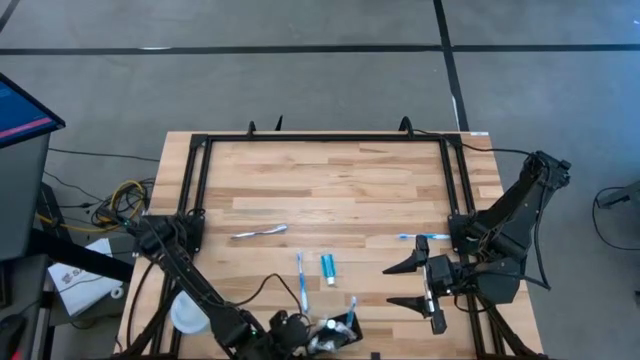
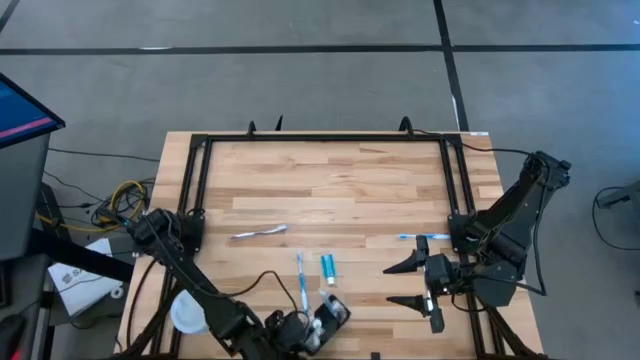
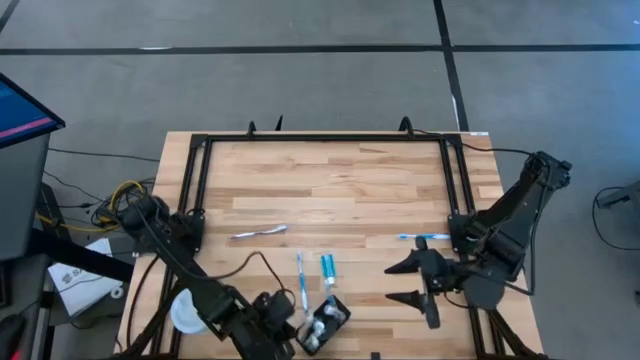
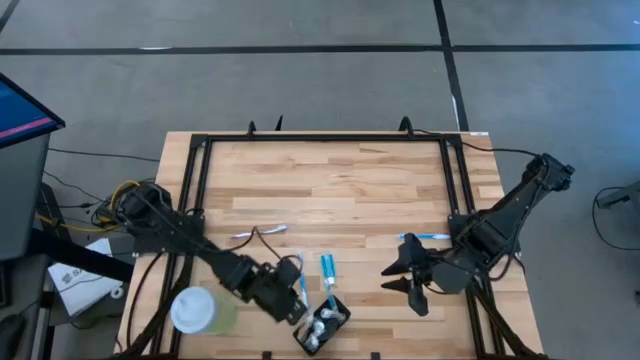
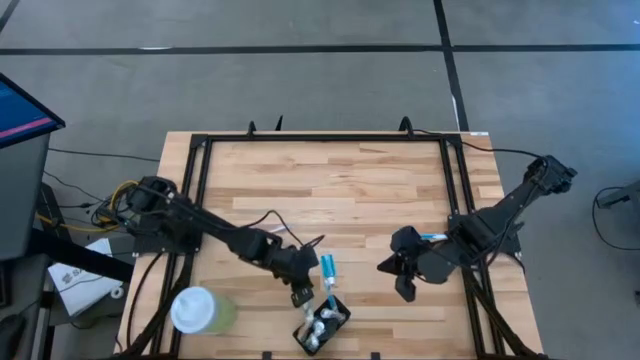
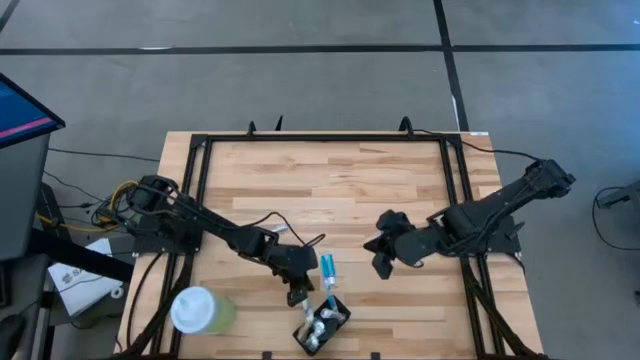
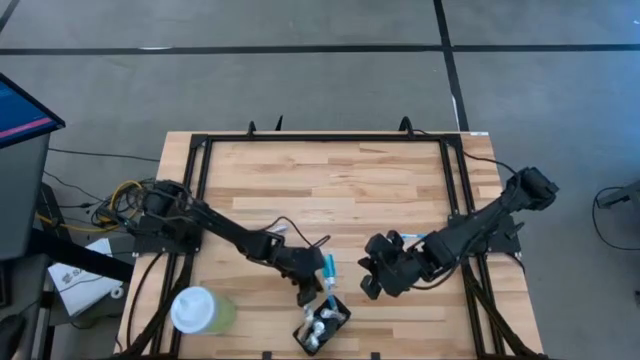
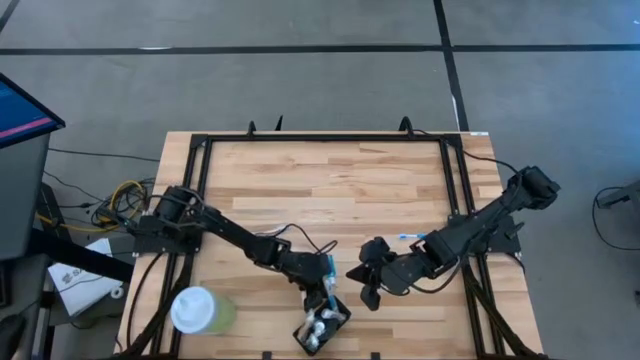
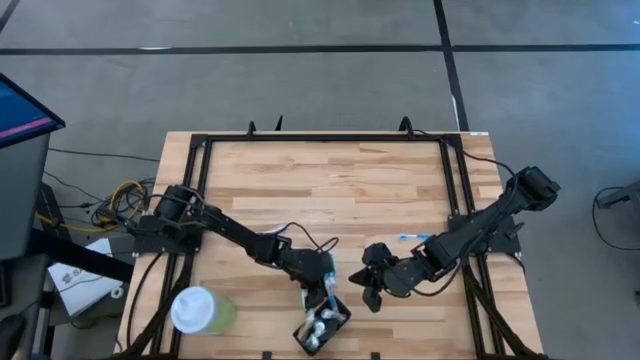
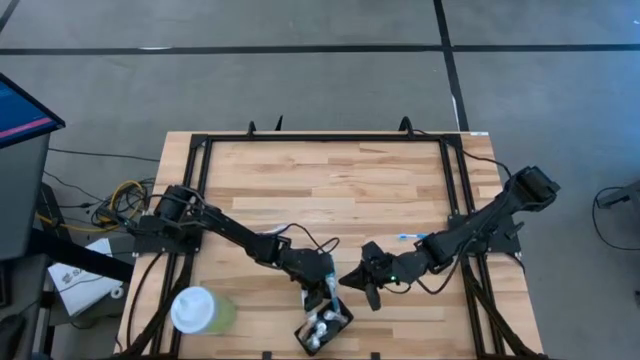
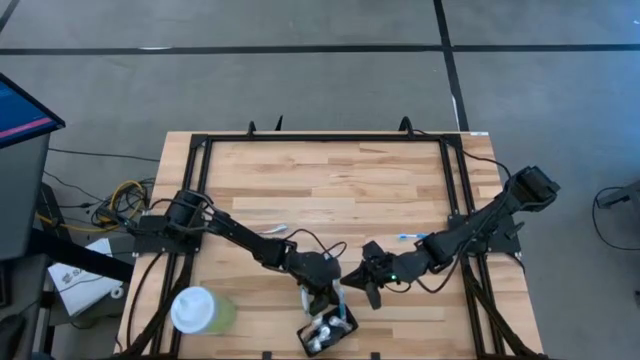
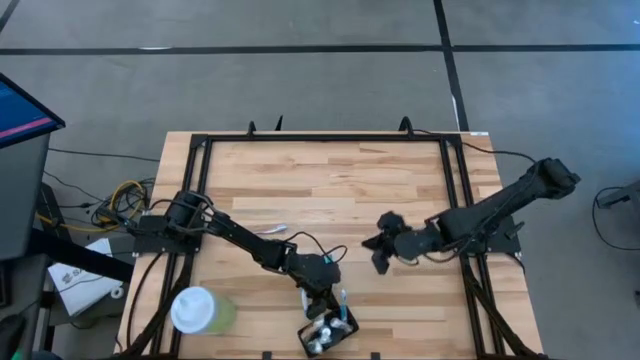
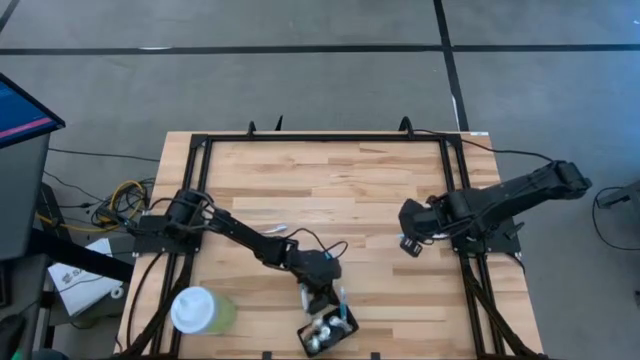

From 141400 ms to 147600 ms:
Task: Pick & Place toothbrushing station
Adjust the black wire organizer

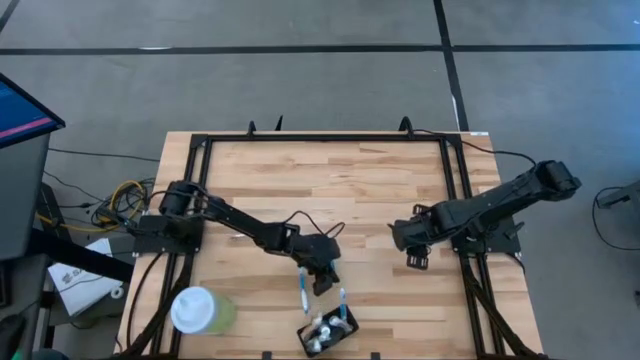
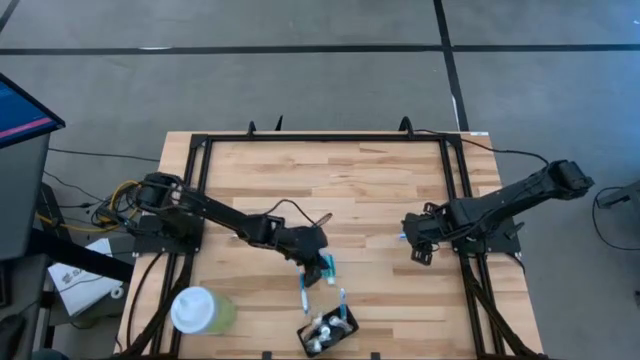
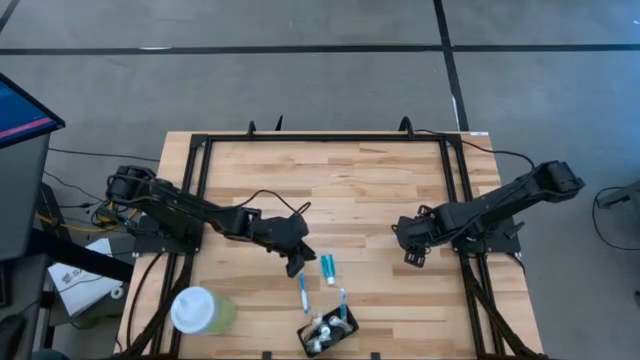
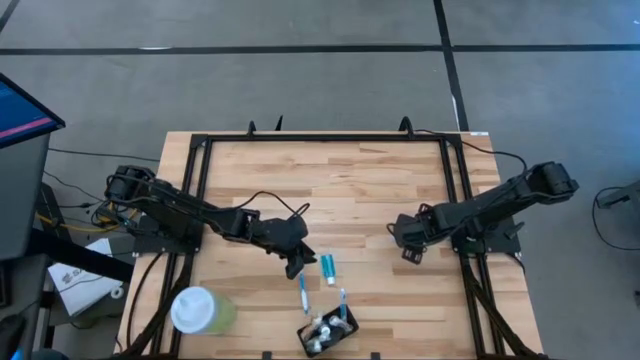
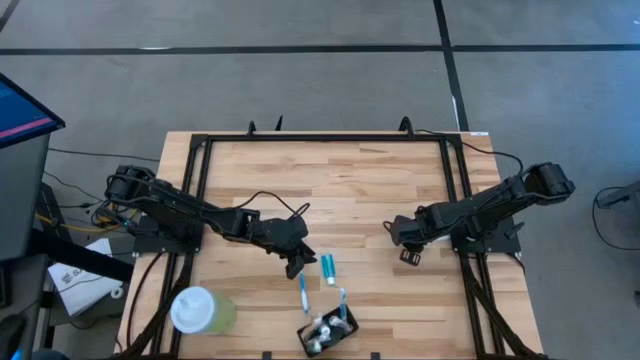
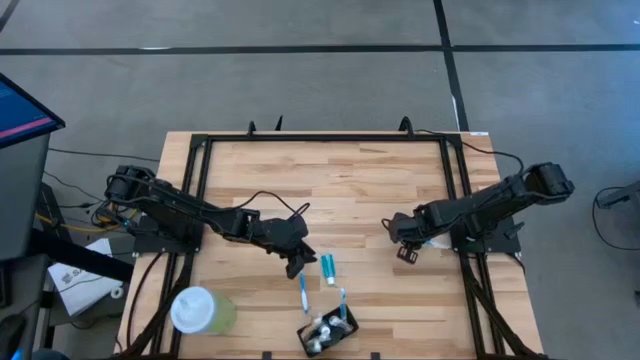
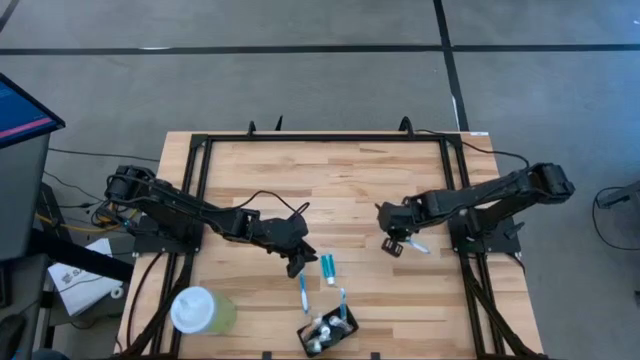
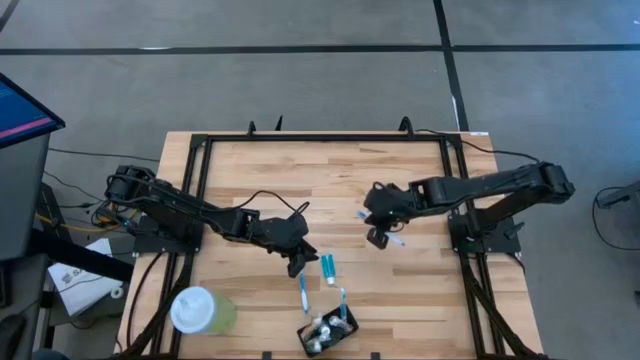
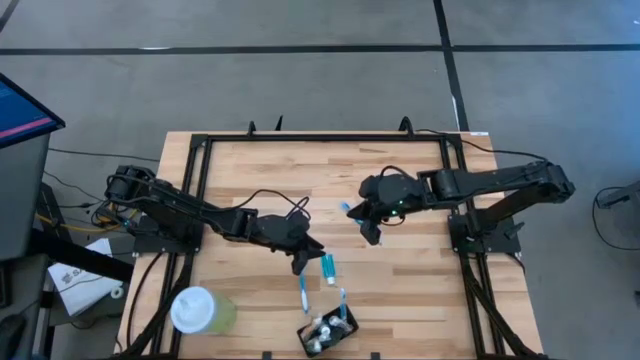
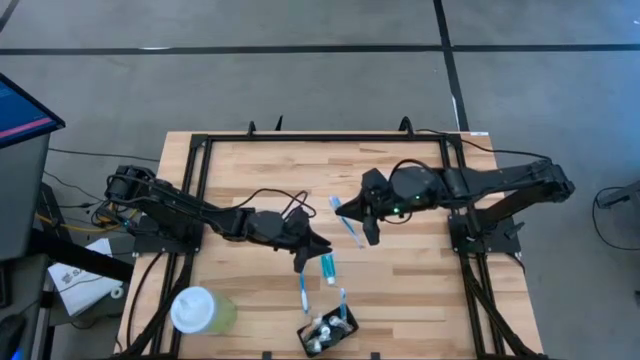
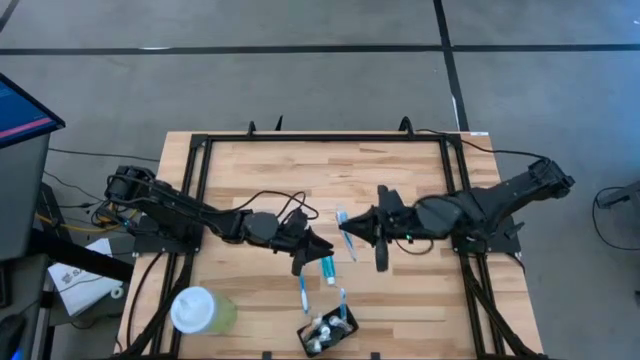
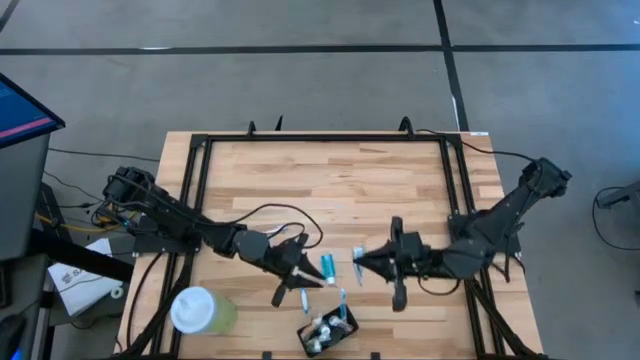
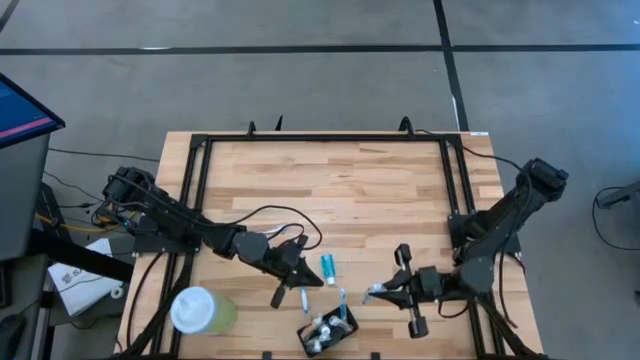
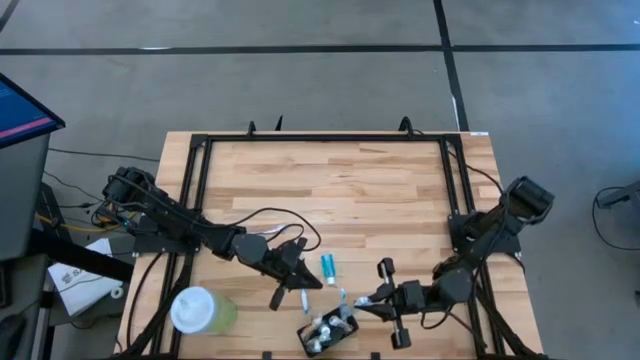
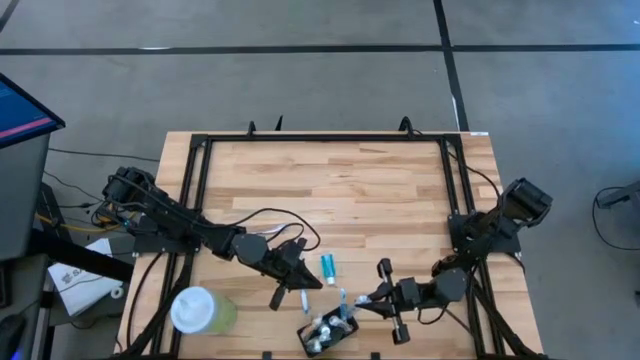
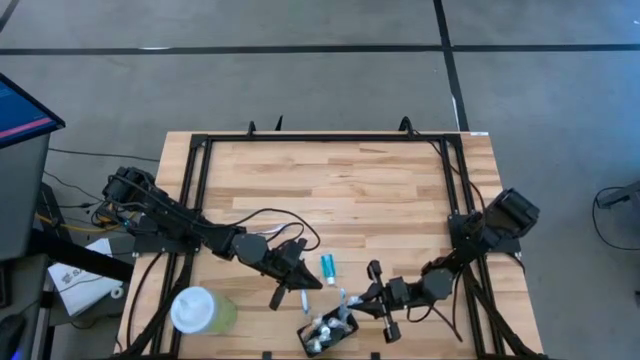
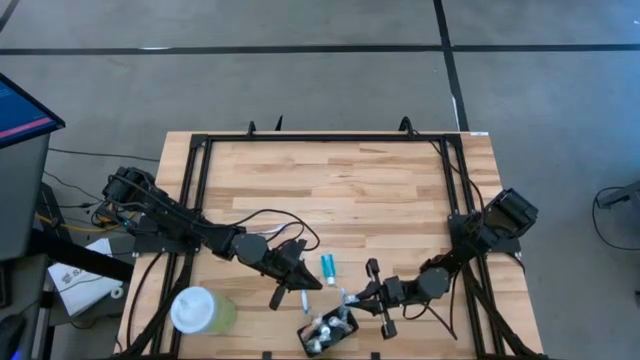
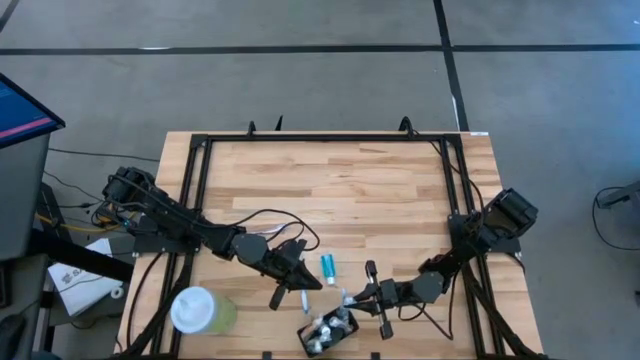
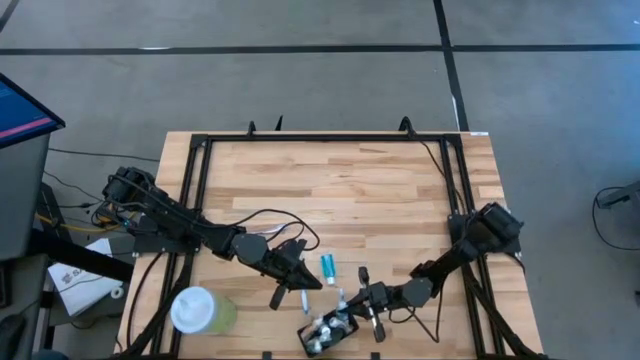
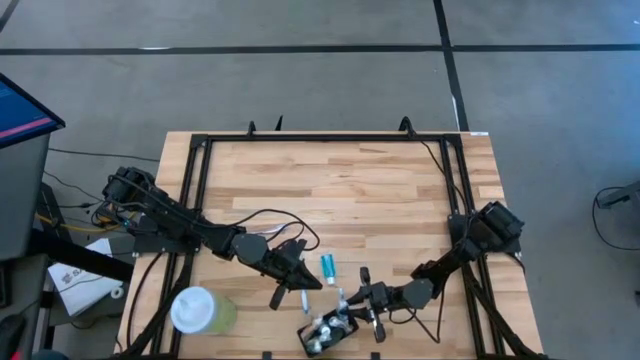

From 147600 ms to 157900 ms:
Put the top blue toothbrush into the black wire organizer
